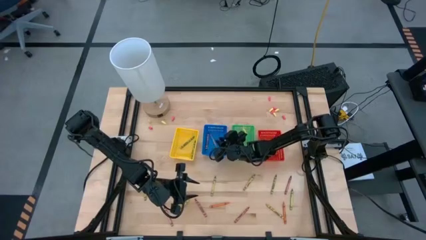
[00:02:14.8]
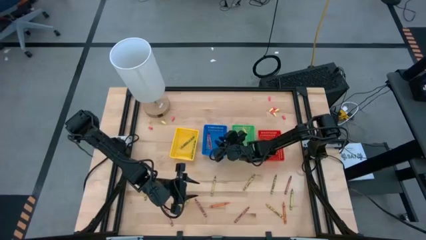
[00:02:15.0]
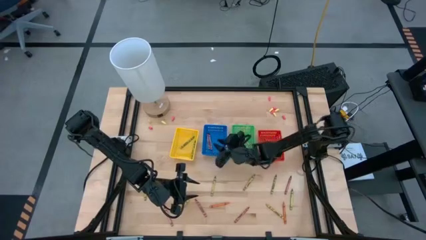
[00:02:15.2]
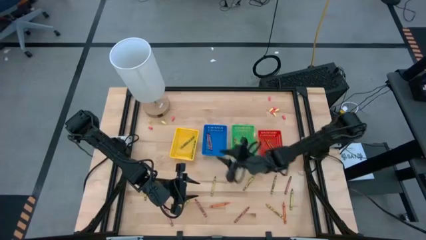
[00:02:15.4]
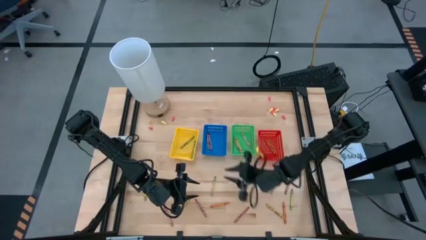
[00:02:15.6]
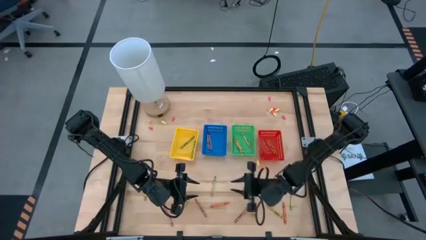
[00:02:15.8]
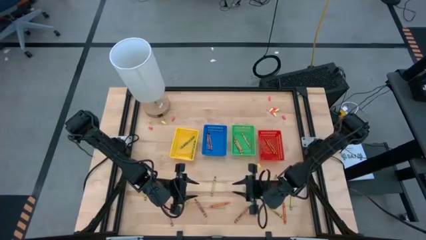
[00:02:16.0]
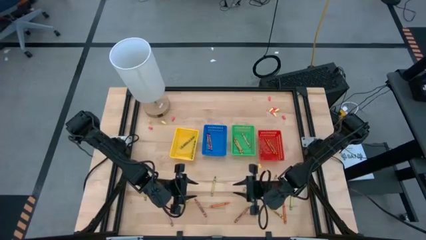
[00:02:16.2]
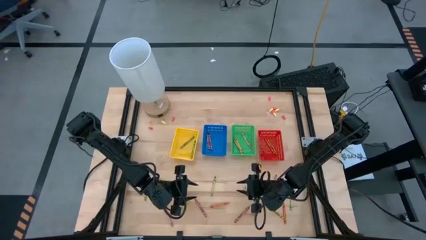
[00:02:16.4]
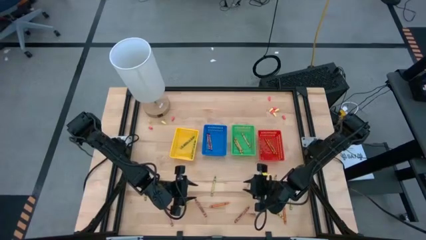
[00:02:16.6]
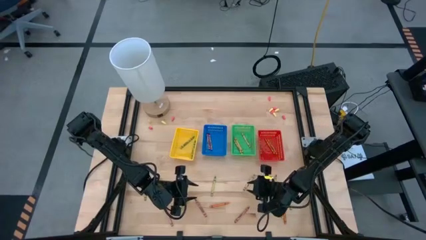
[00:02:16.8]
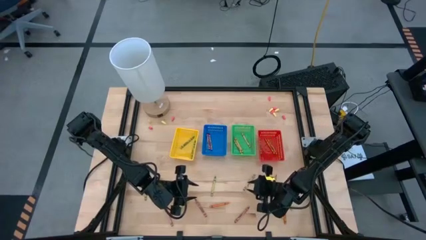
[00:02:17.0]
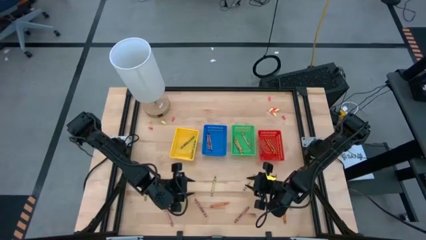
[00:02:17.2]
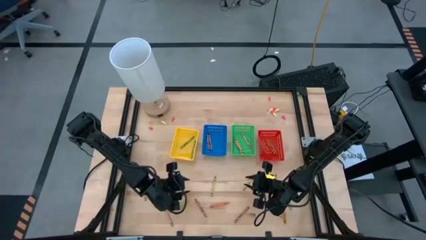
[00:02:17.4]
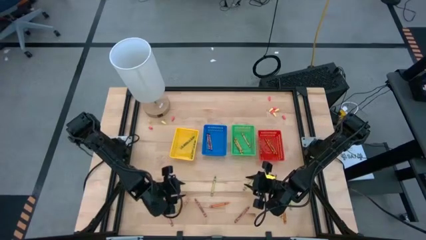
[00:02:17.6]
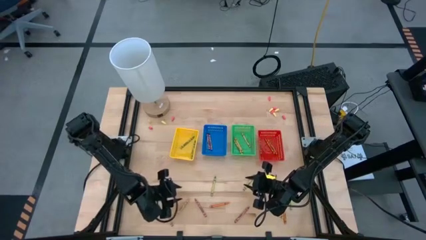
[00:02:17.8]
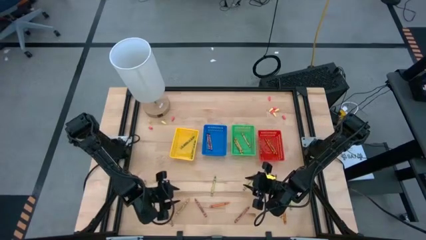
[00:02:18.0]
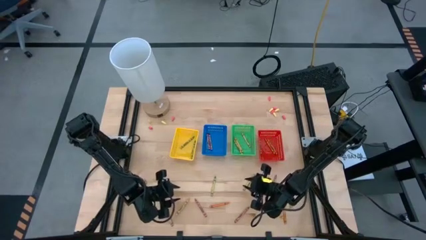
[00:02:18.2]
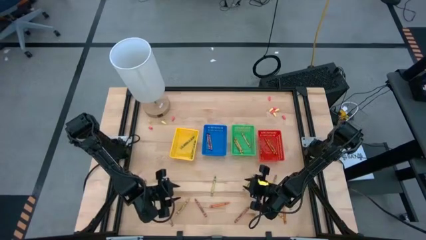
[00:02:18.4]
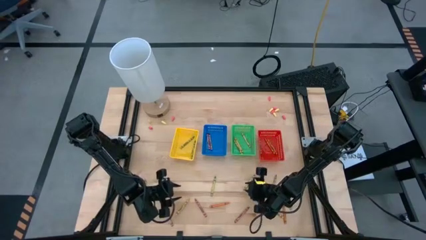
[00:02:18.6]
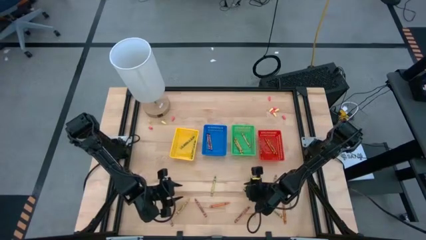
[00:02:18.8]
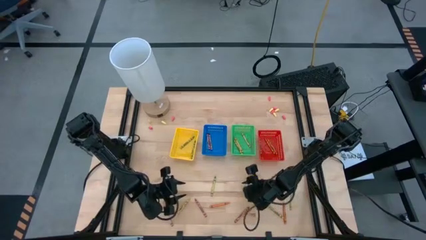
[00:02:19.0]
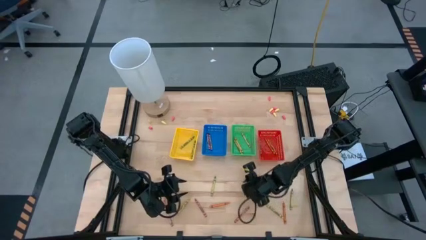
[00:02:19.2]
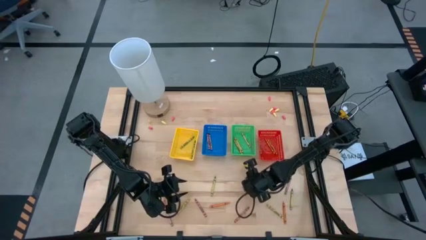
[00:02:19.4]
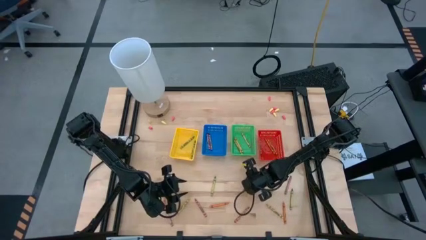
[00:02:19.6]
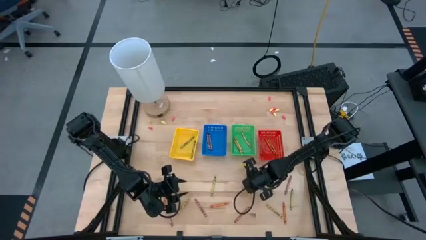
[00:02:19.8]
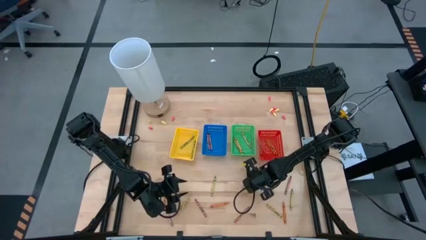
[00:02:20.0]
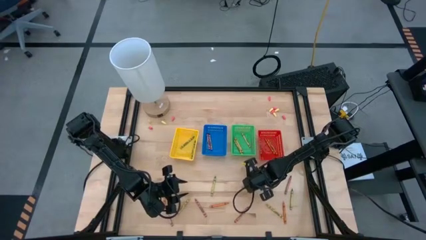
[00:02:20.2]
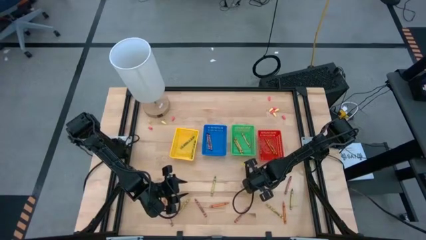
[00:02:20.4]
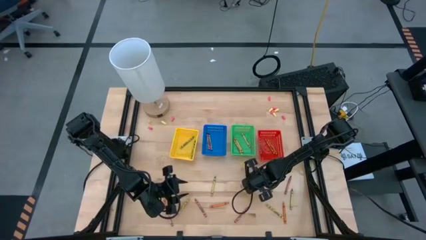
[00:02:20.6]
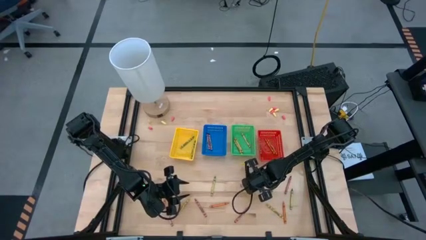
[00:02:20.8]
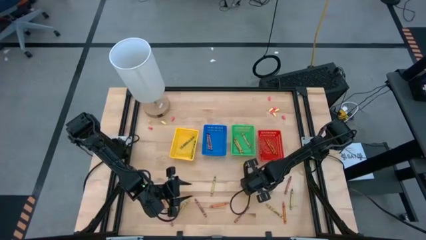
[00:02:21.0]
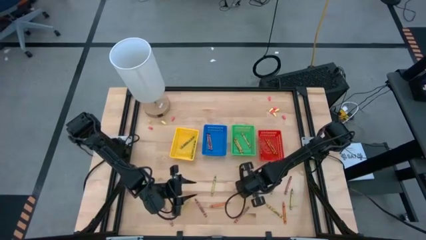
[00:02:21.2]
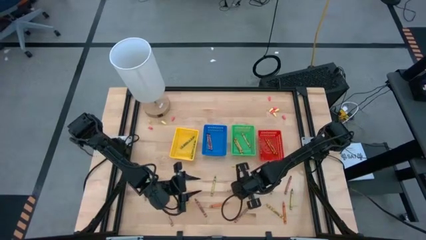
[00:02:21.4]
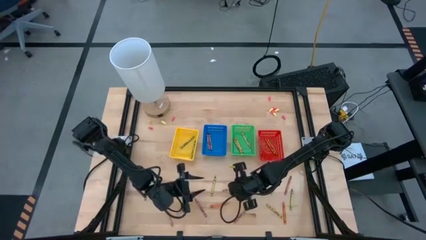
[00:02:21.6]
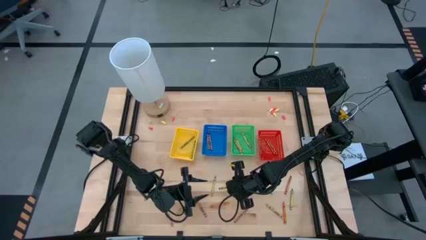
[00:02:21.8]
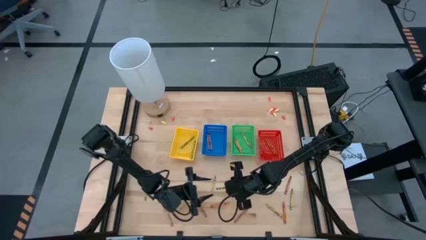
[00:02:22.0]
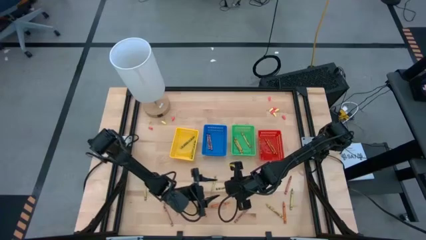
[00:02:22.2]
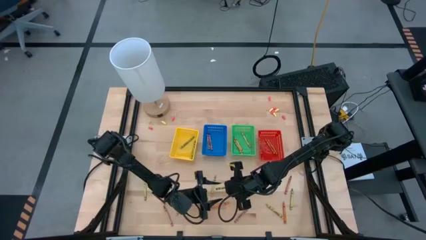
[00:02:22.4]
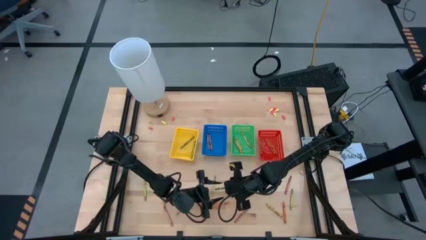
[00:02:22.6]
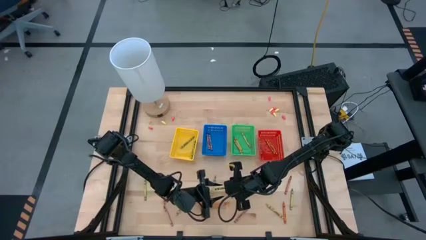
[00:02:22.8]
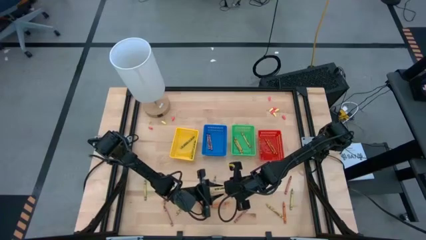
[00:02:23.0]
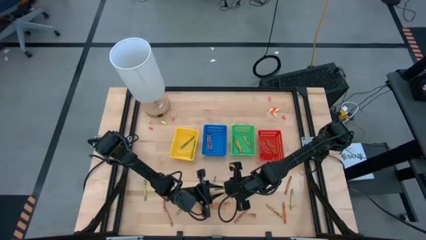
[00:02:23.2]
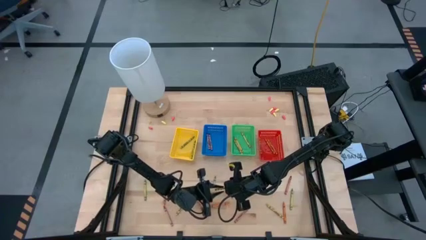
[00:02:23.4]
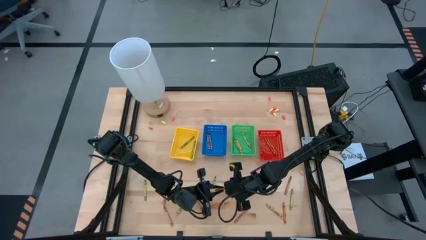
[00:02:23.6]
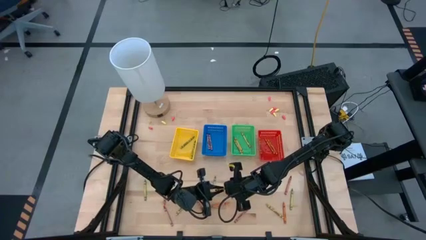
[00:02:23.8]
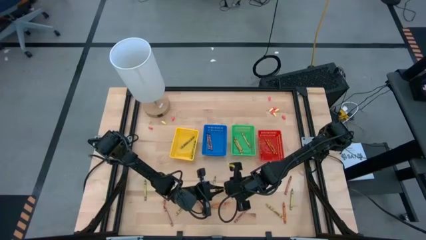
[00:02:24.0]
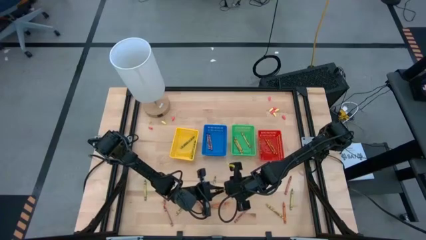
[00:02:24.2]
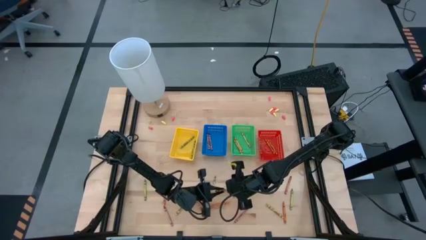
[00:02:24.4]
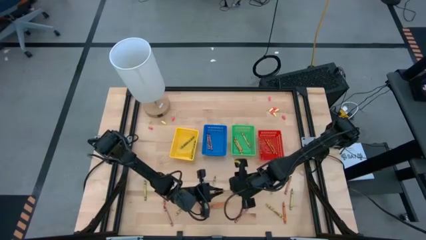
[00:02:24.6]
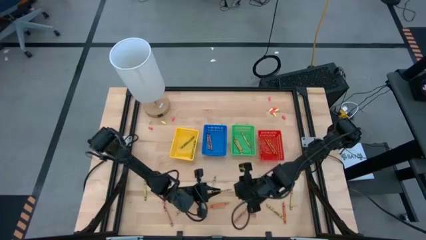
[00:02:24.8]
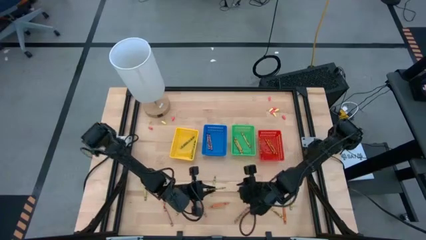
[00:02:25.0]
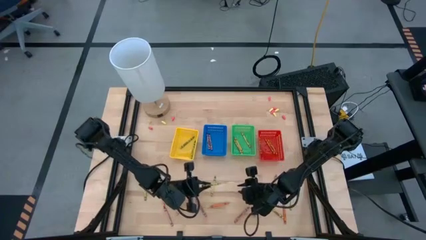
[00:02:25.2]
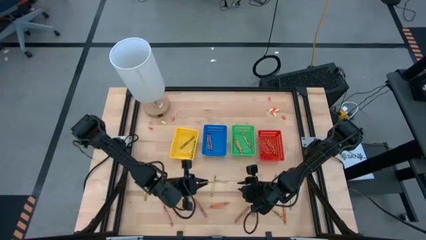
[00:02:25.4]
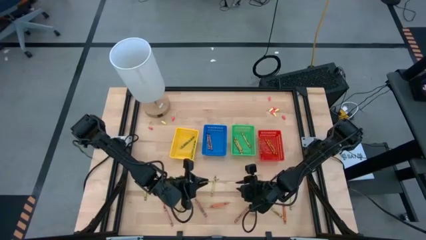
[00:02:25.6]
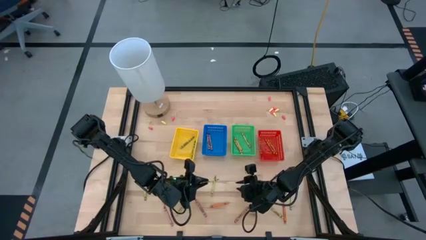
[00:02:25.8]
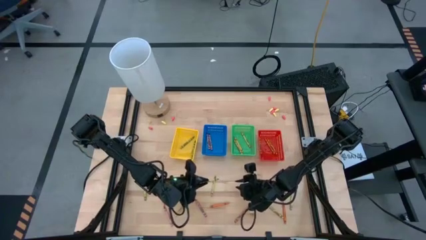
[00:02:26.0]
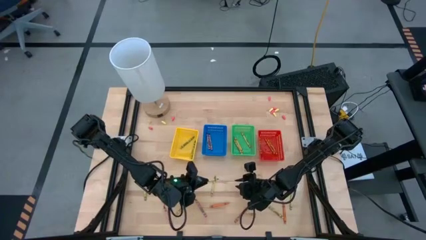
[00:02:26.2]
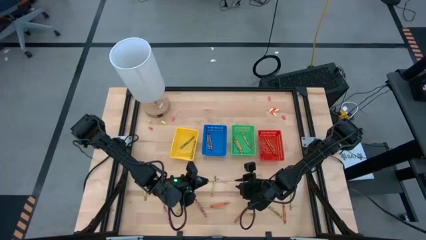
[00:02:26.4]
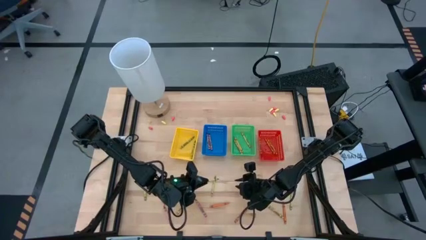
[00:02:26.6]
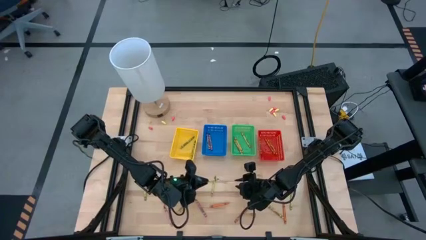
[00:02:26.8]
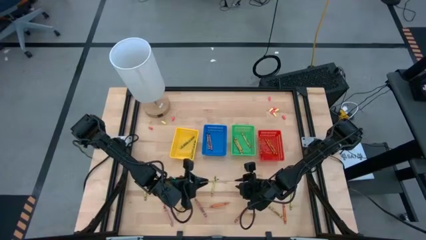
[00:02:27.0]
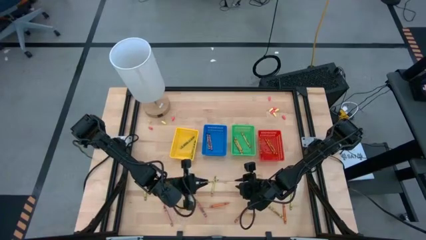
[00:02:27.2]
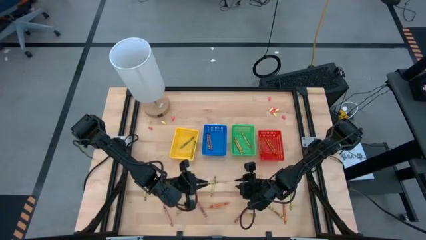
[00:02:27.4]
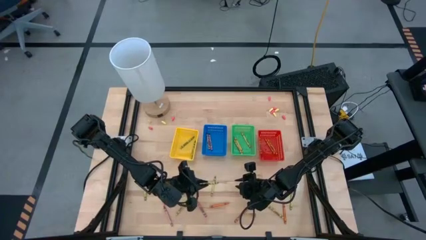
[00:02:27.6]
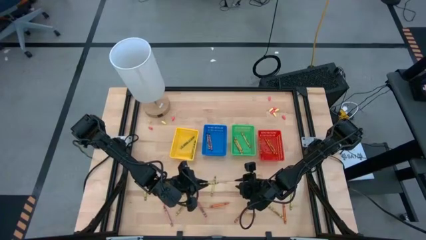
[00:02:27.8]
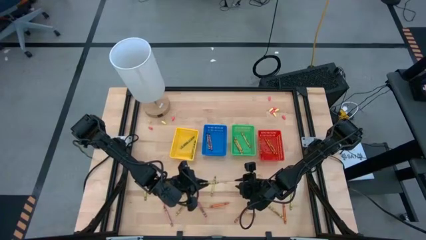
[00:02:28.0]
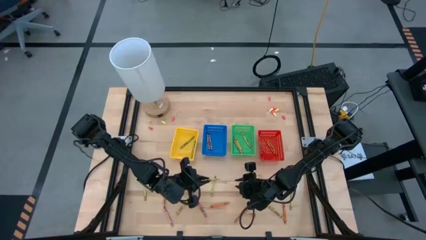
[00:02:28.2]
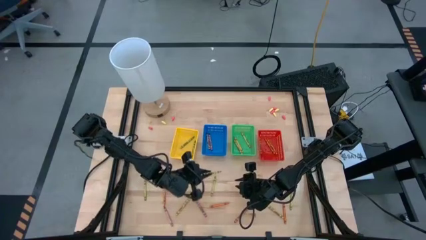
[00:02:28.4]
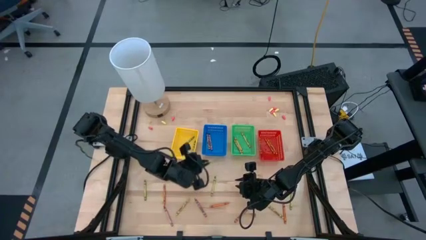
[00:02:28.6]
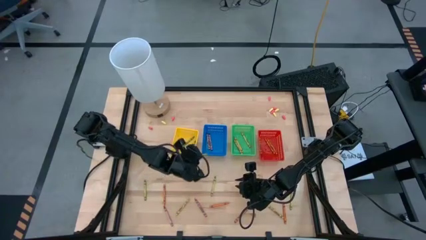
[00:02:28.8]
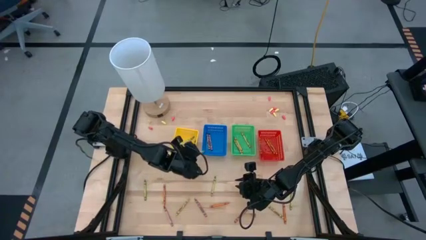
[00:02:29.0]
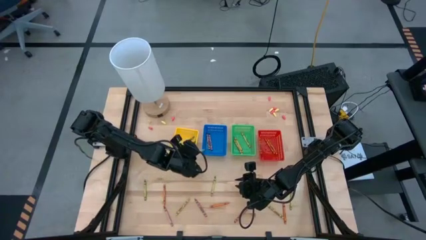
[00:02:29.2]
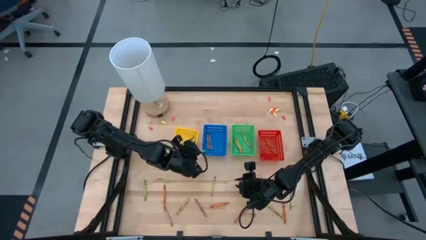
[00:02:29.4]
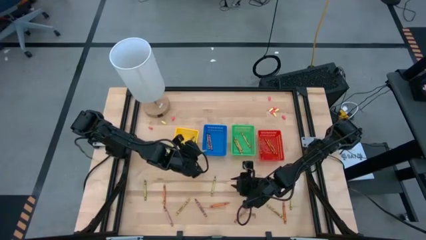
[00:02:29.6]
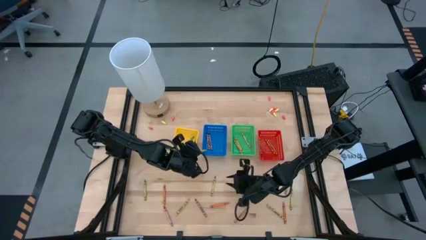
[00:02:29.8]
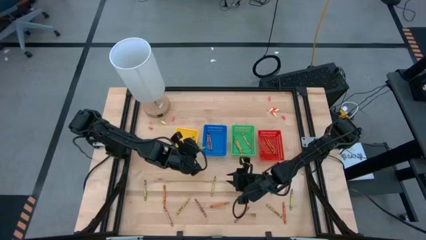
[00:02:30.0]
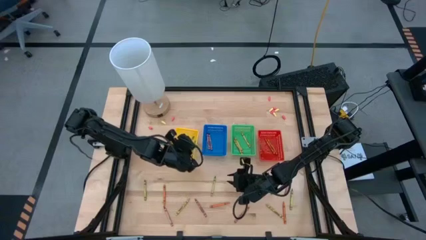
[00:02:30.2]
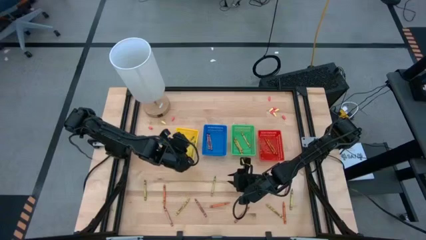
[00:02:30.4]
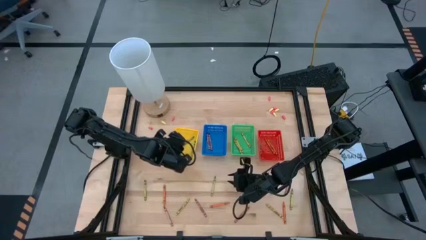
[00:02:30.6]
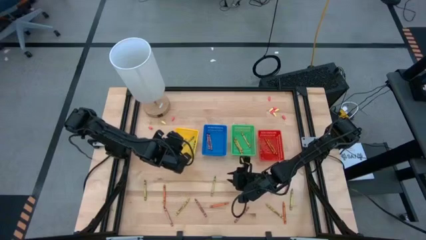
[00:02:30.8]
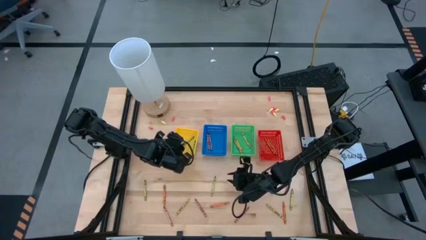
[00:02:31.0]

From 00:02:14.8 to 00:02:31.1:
Task: Sort crayons
Put the green crayon into the yellow bin
